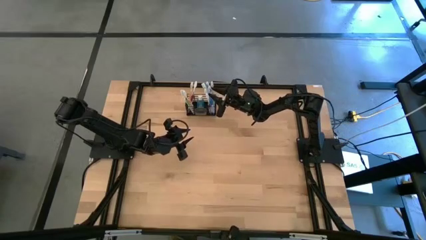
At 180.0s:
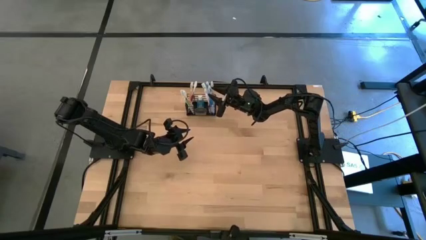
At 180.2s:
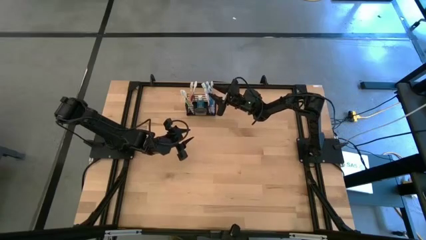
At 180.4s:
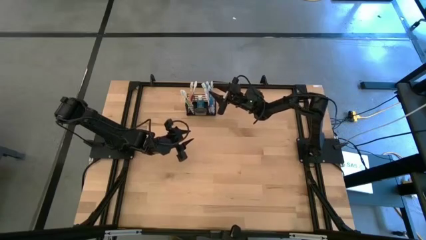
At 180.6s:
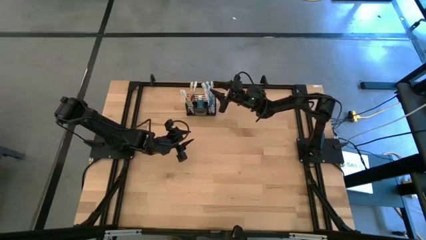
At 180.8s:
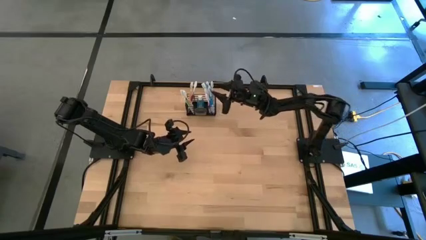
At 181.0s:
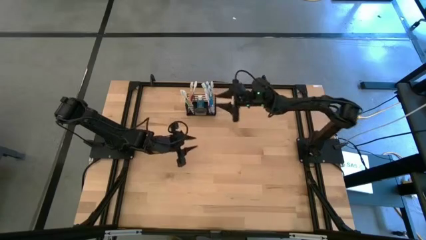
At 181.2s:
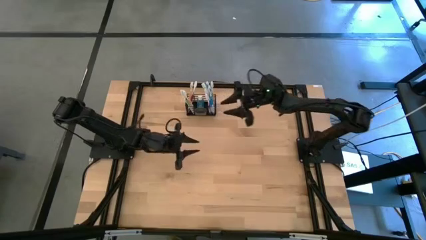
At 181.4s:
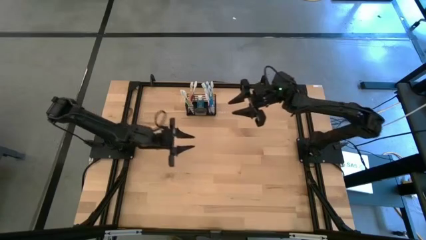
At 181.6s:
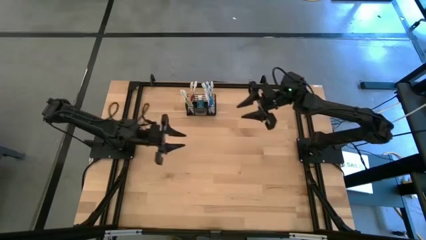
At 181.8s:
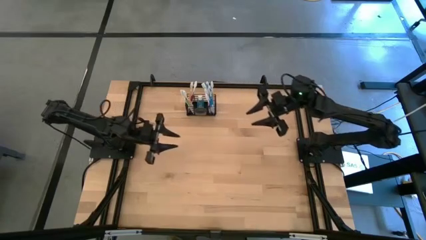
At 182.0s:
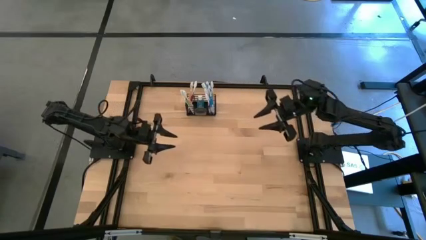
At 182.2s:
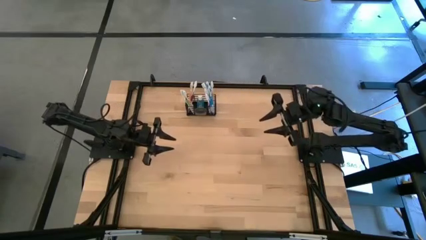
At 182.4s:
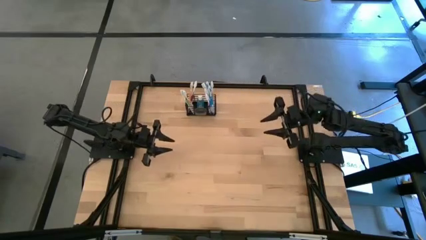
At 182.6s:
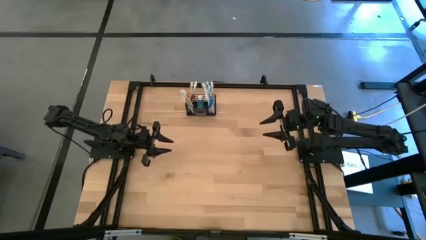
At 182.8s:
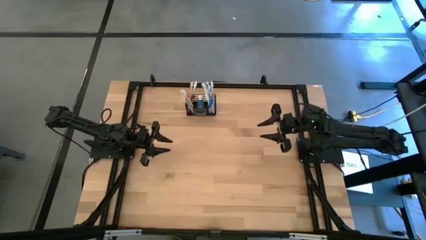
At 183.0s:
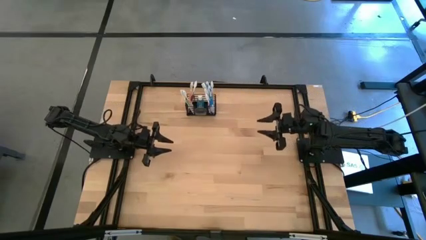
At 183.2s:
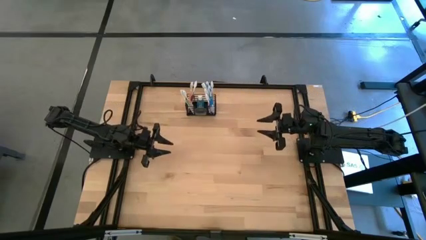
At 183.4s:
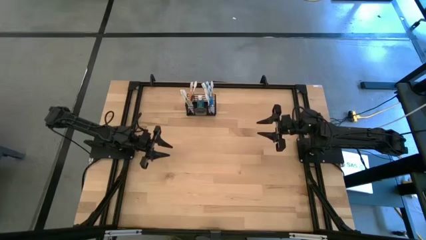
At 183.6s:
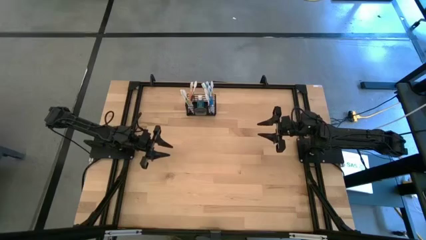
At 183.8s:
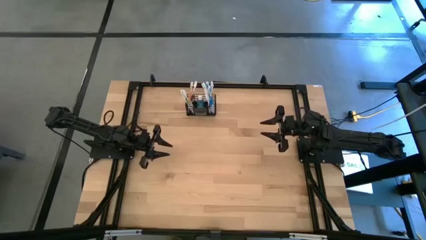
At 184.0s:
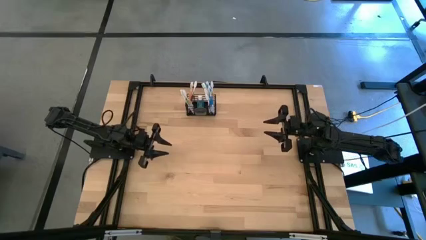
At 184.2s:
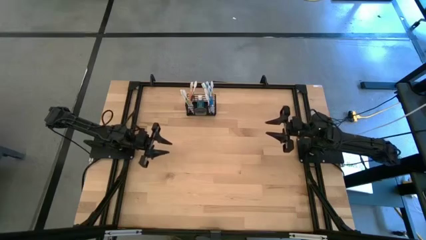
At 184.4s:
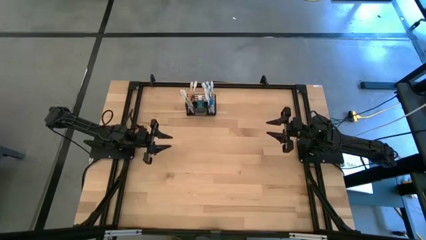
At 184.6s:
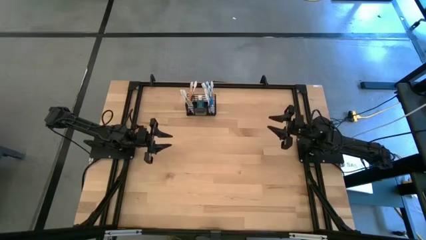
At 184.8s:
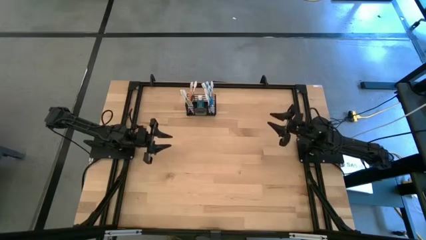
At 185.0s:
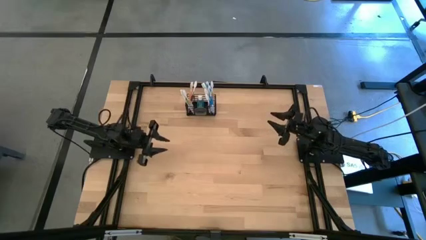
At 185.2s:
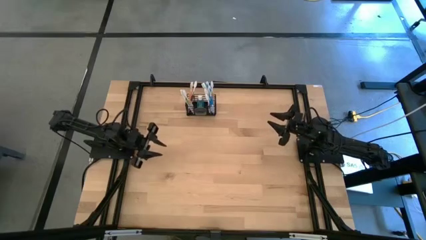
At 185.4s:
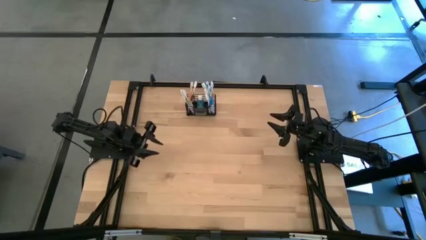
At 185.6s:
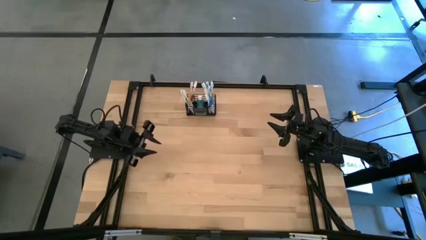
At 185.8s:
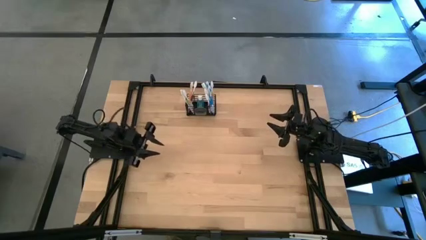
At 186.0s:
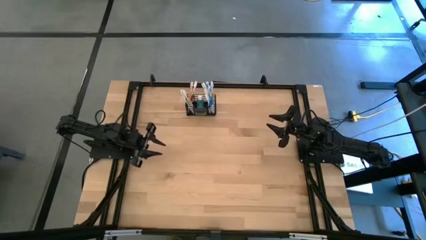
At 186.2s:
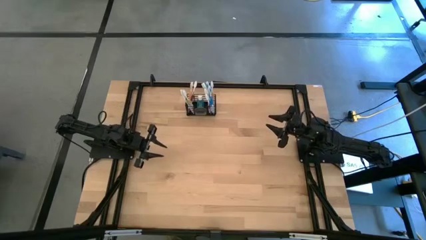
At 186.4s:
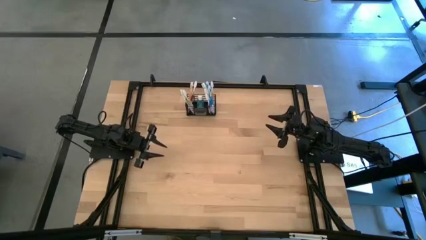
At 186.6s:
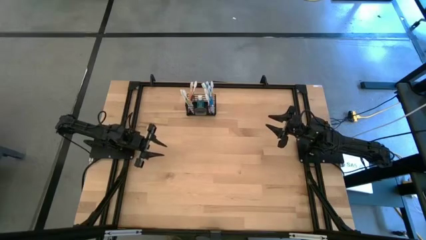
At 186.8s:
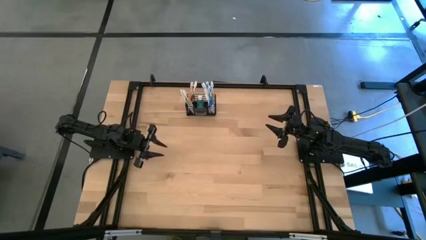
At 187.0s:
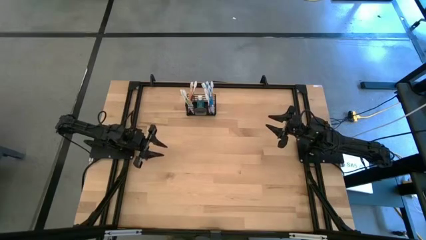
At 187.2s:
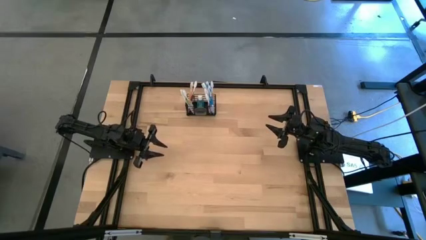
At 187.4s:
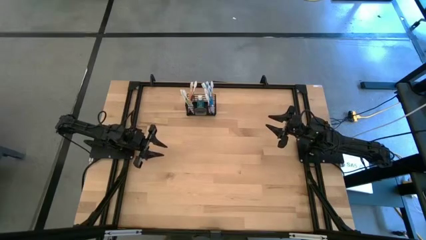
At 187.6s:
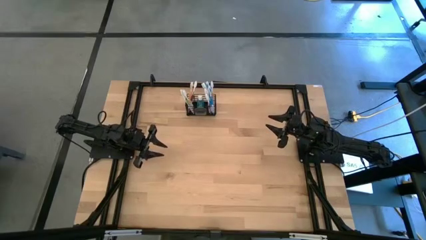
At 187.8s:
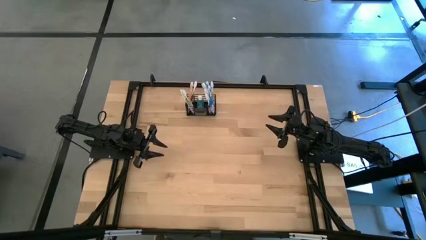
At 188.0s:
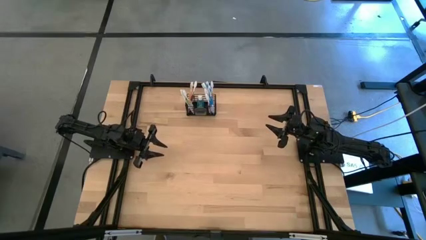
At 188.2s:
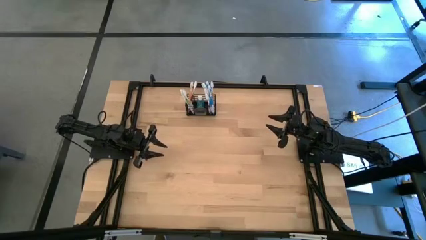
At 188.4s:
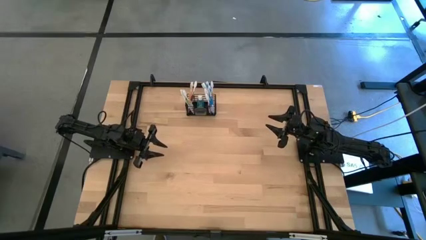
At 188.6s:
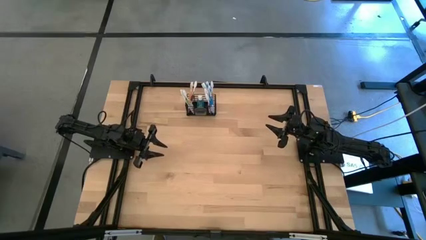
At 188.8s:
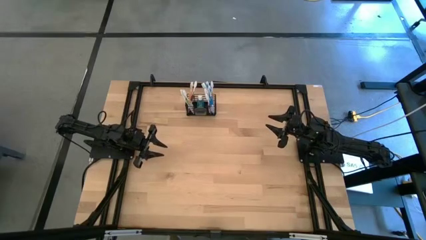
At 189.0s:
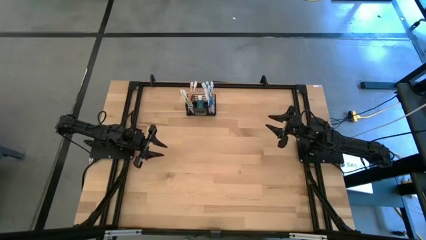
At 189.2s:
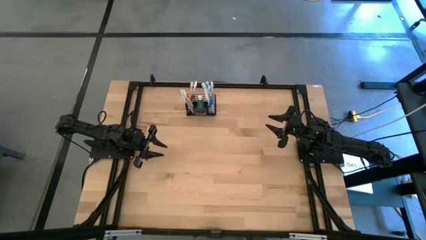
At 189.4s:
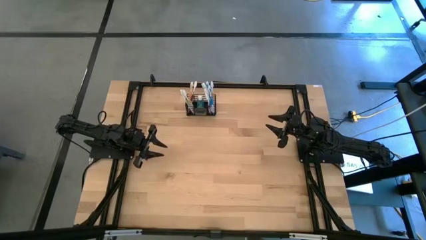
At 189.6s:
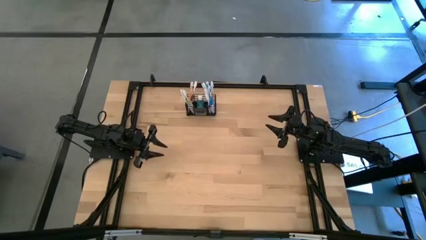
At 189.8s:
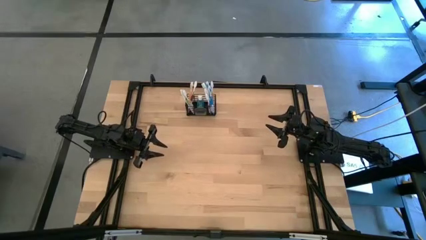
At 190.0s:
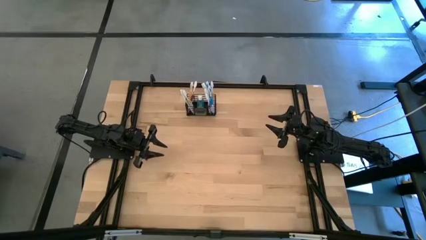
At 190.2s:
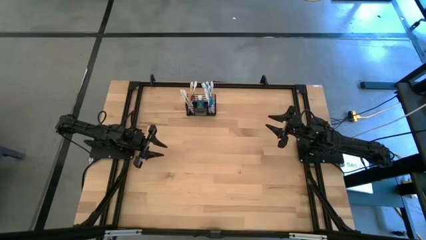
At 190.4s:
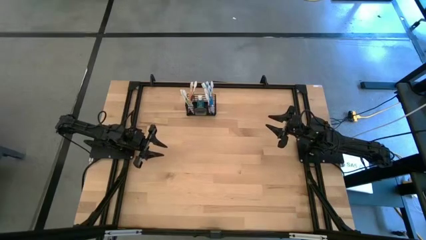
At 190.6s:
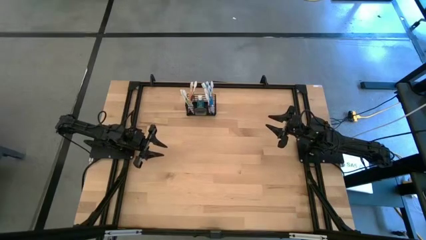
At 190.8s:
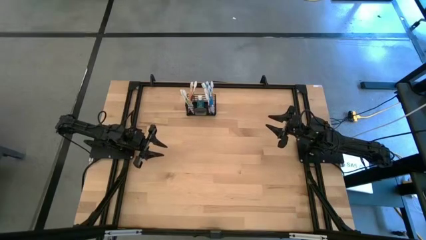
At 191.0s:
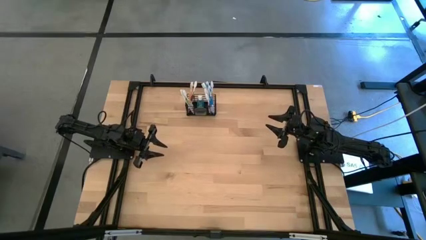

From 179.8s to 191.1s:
Task: Pick & Place toothbrushing station
Return to Home Position
